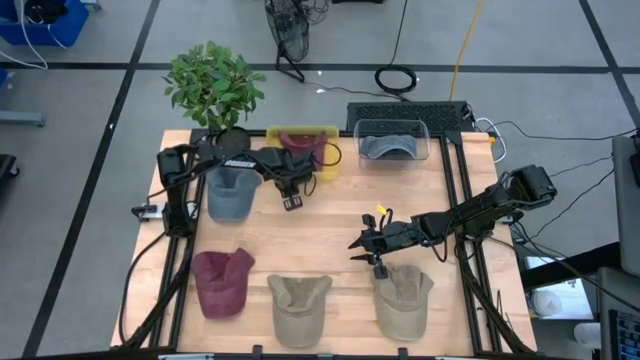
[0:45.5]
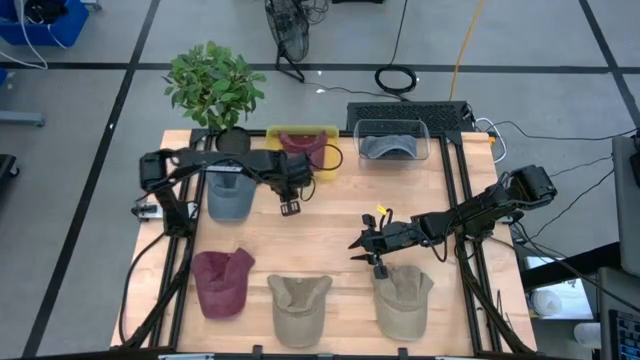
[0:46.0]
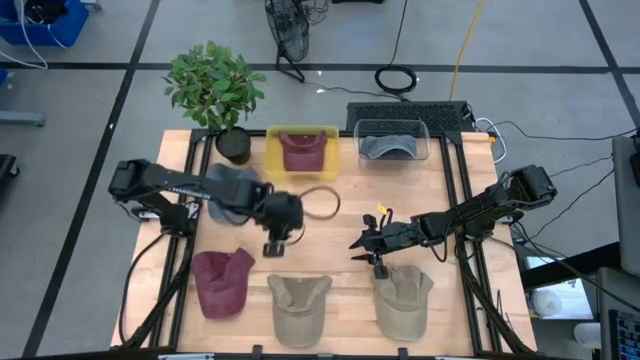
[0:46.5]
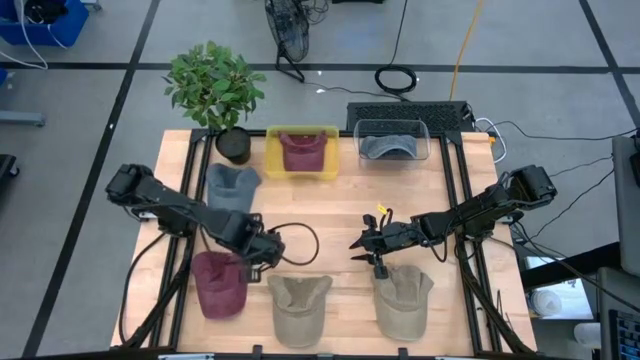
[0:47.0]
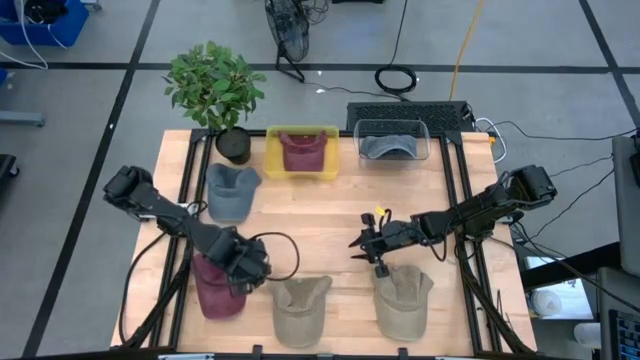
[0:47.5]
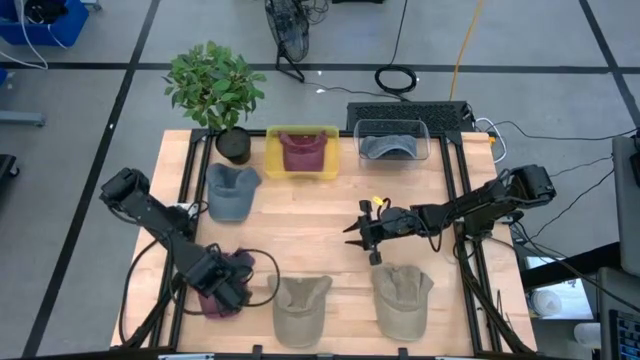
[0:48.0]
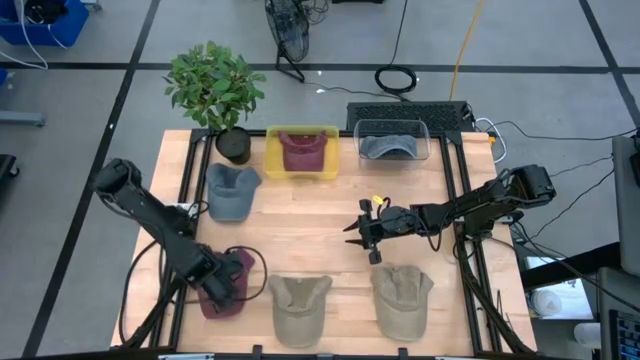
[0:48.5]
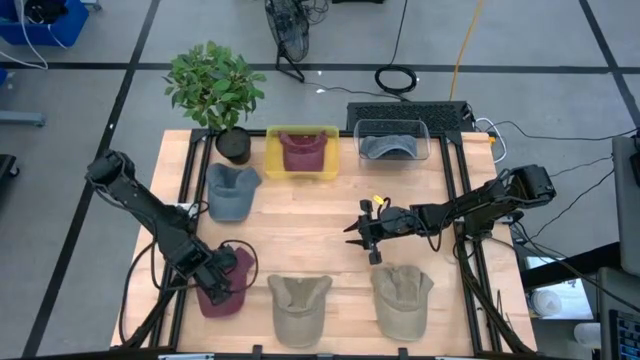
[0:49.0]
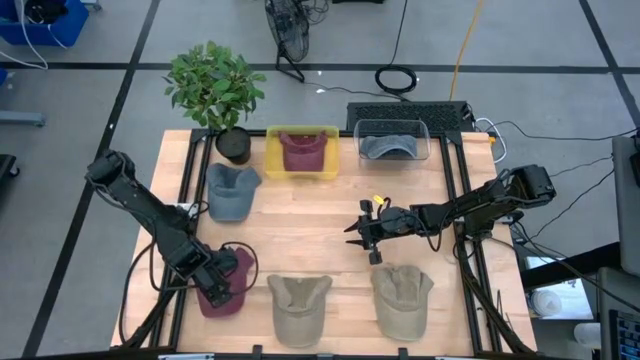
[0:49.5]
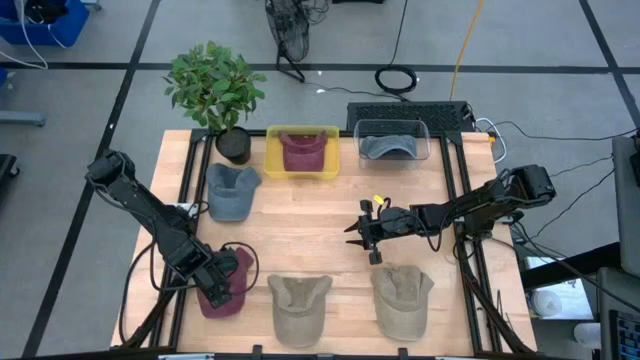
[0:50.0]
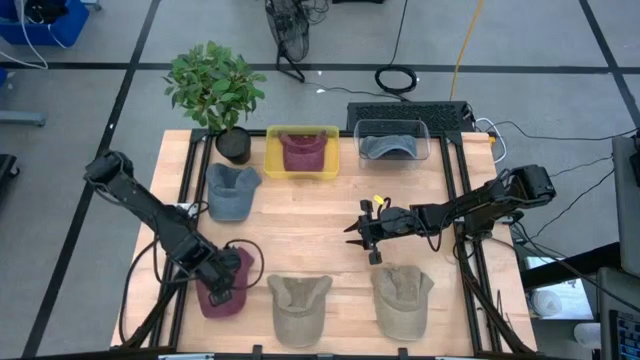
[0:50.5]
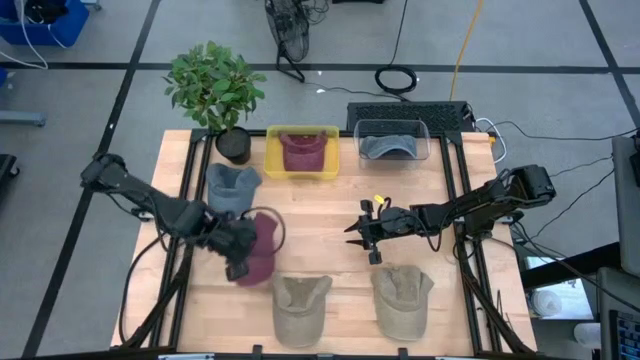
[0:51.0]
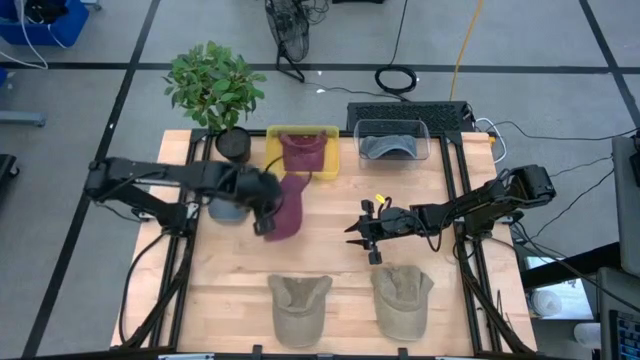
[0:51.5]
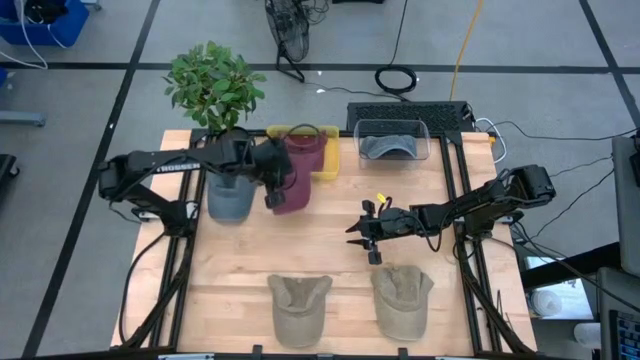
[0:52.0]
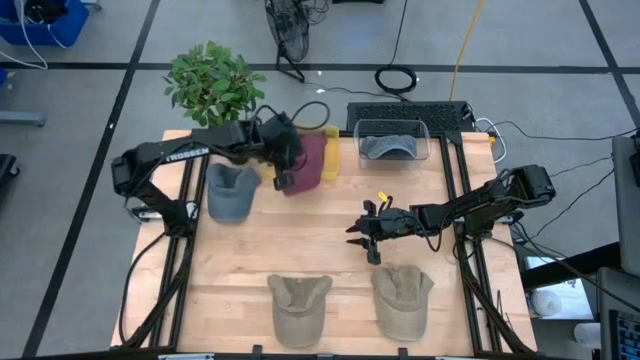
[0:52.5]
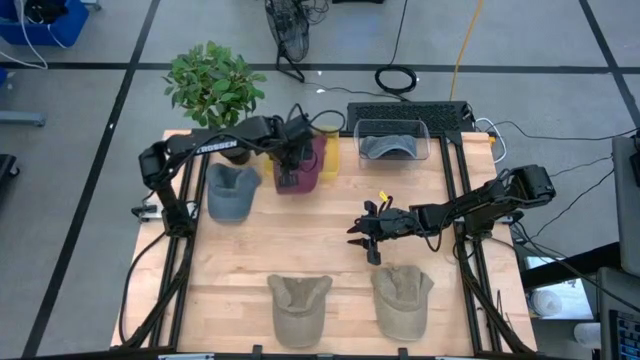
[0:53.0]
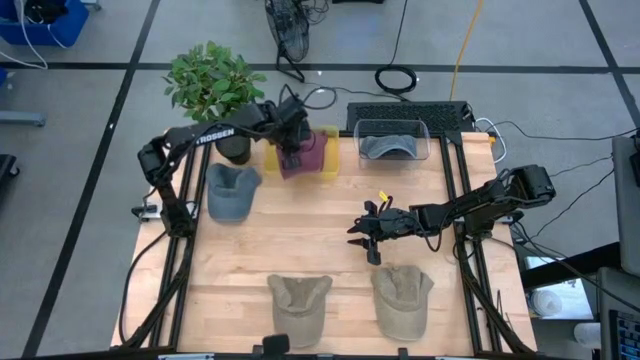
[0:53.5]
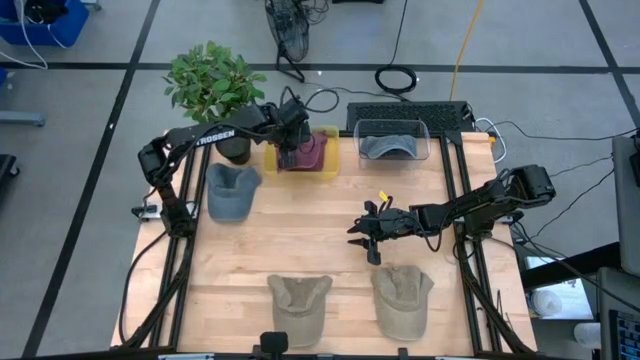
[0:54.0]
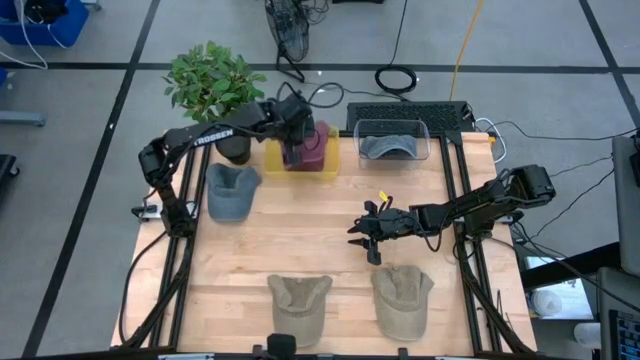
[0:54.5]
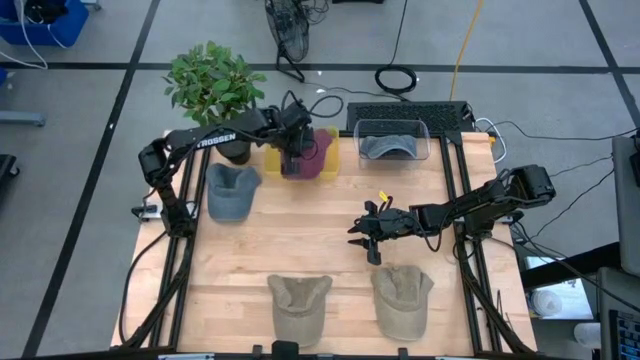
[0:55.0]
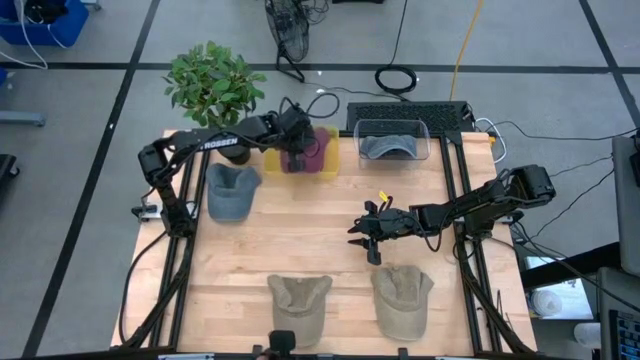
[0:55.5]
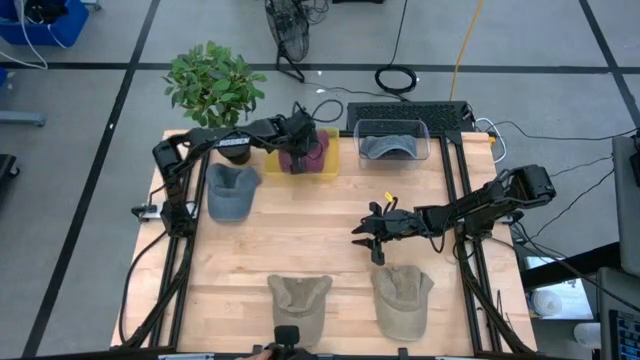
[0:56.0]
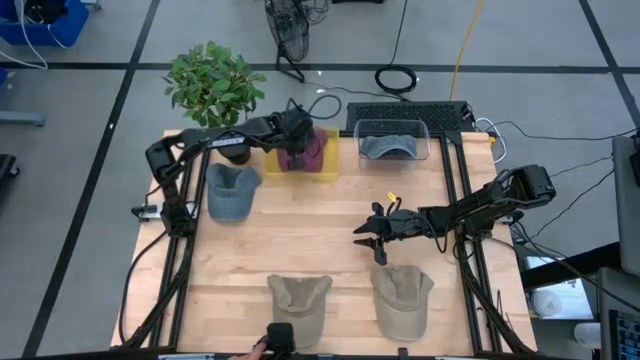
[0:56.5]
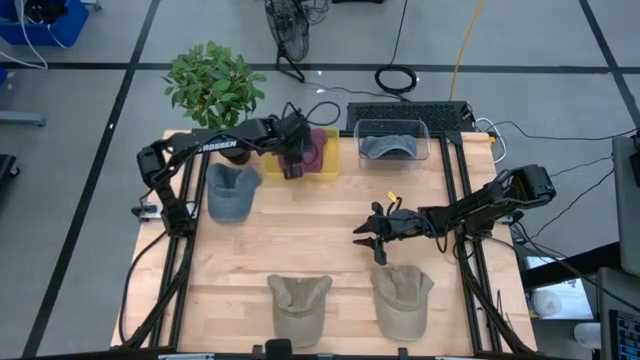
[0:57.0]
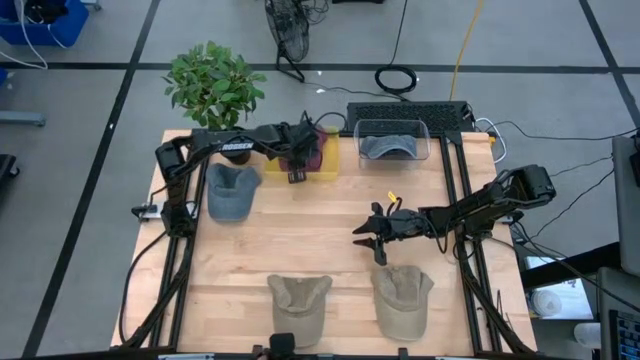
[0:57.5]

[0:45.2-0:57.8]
Task: Pick & Place hat
Put the red cap into the yellow bin

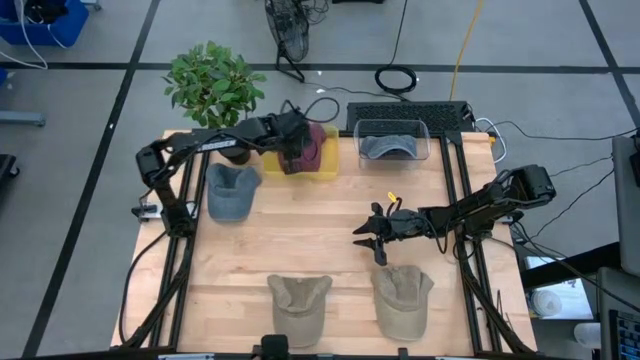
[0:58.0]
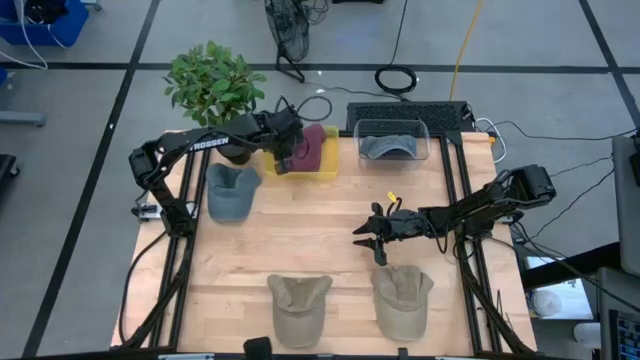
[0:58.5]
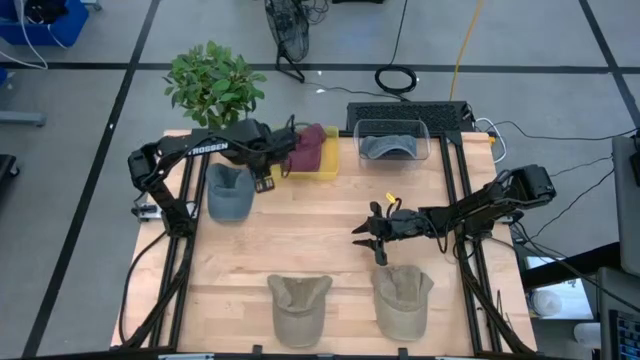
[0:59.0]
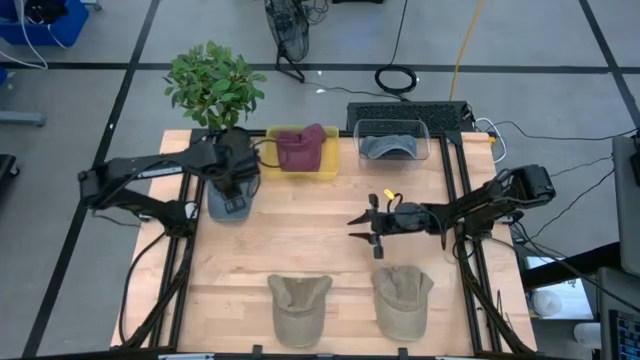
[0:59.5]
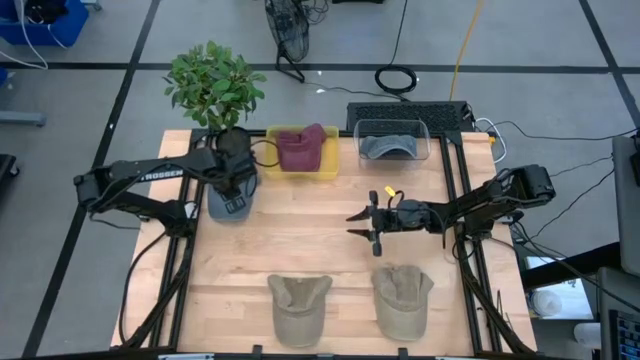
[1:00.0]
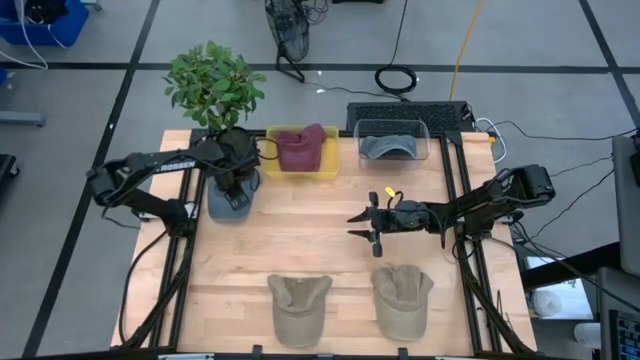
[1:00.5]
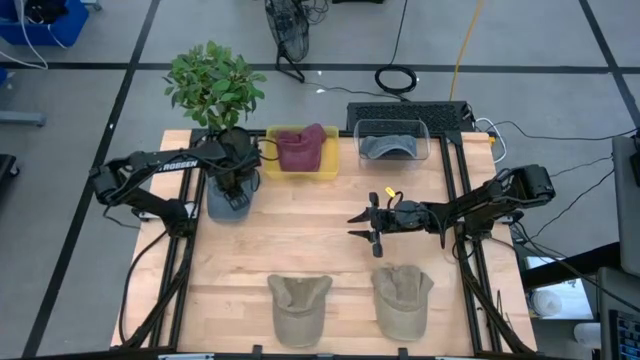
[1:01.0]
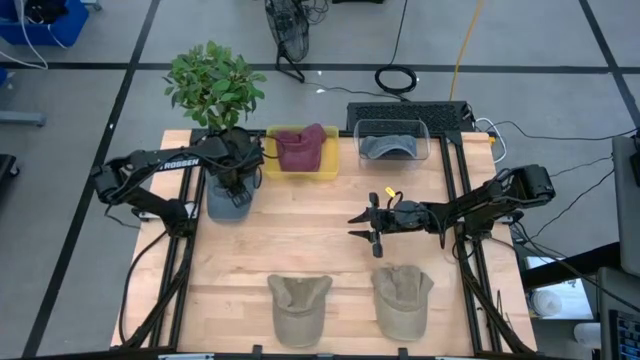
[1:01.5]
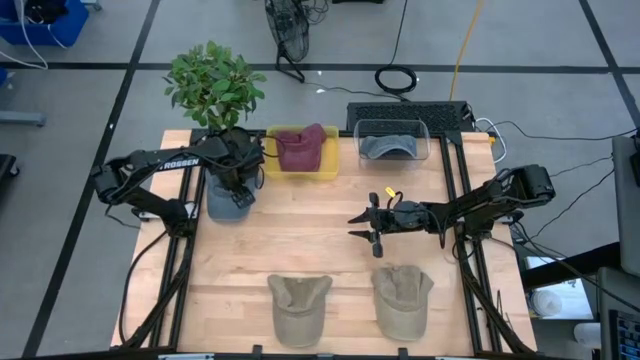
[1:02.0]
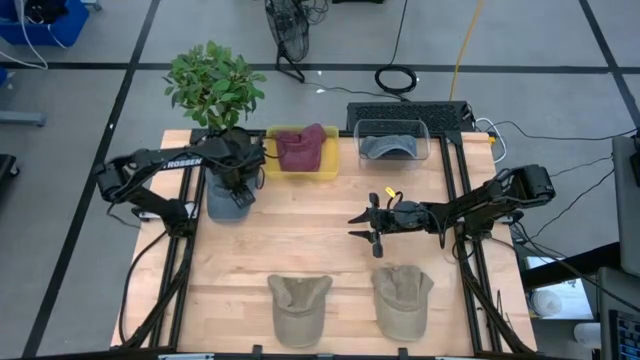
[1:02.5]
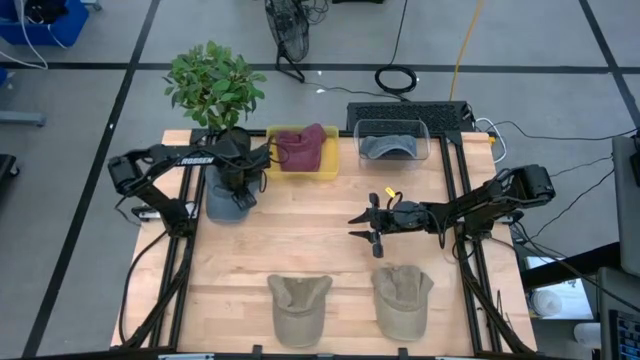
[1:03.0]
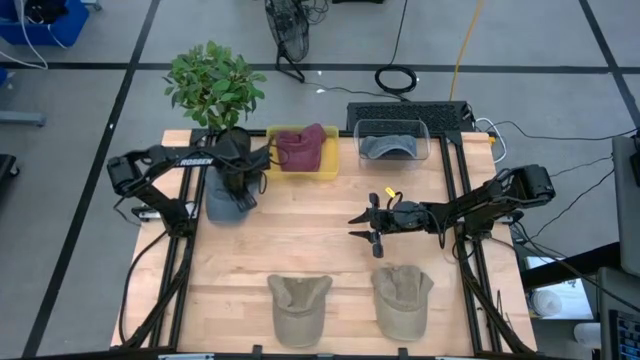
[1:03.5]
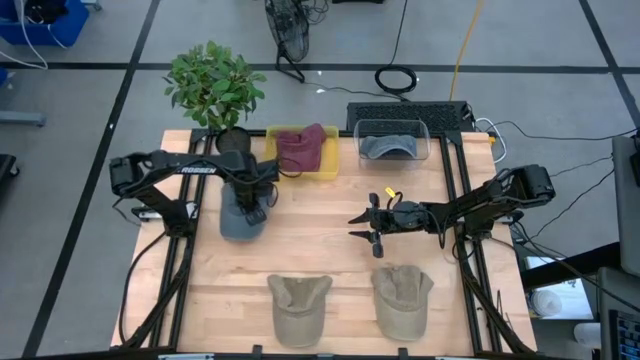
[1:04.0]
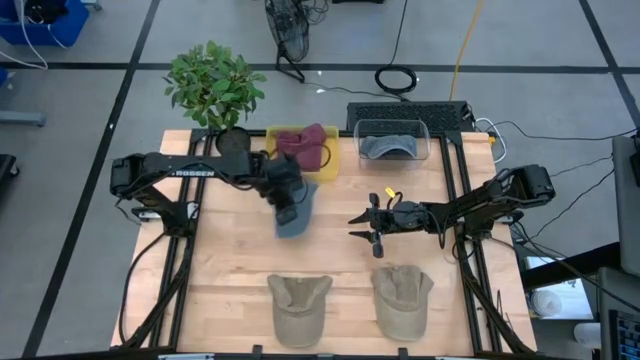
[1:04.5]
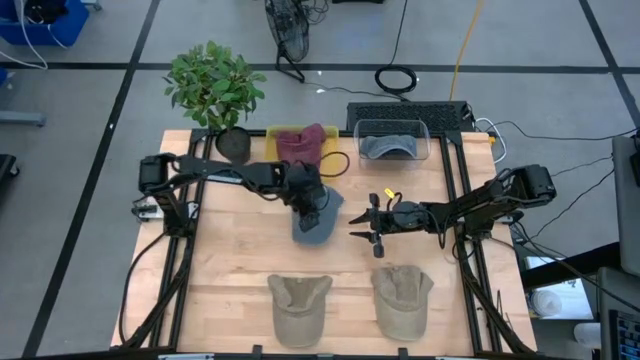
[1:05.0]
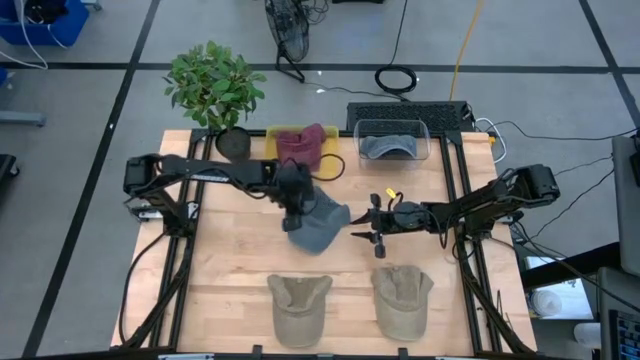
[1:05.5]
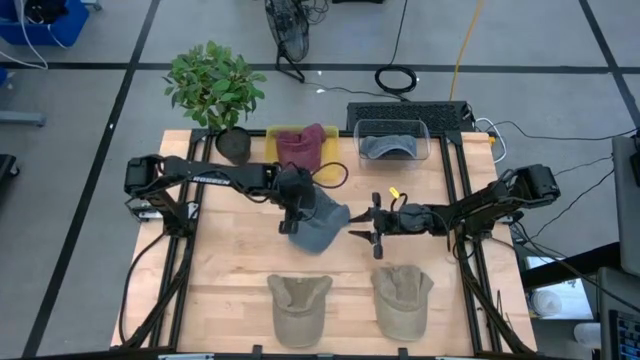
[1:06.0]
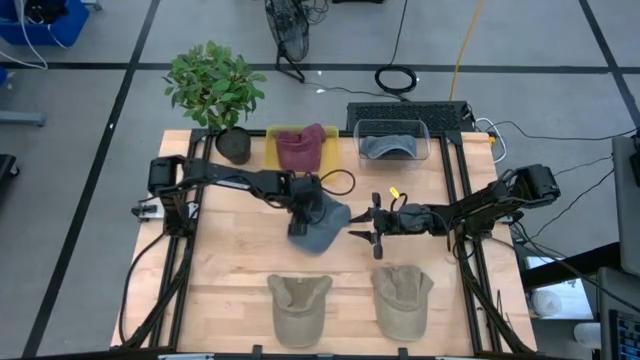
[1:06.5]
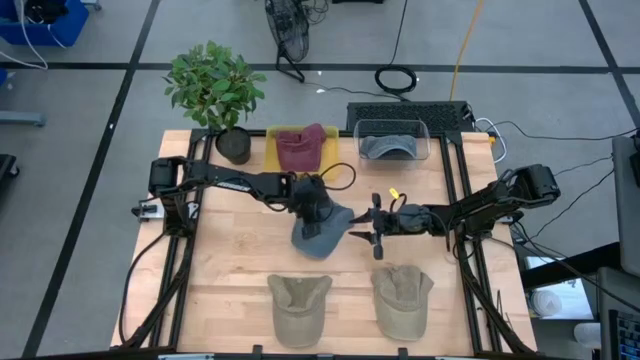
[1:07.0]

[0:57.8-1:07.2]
Put the blue cap into the transparent bin
